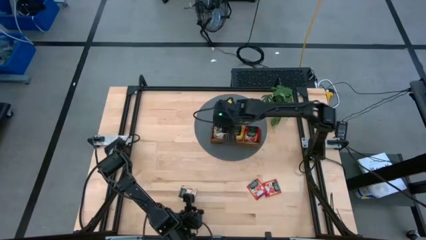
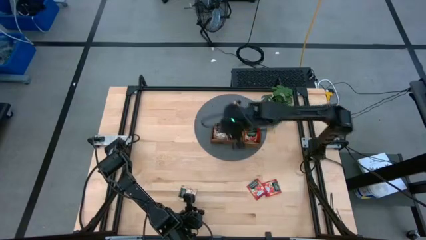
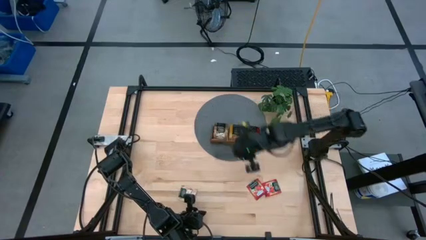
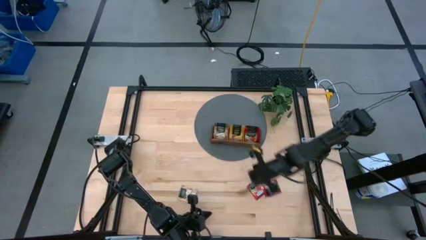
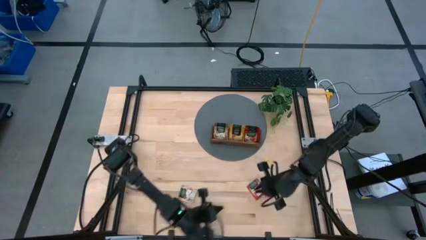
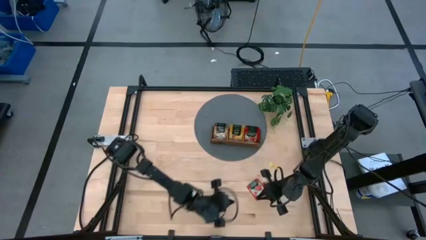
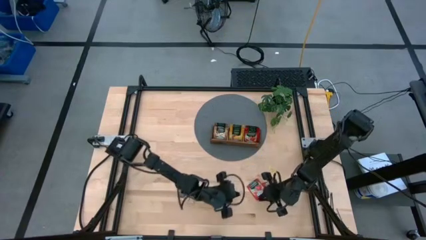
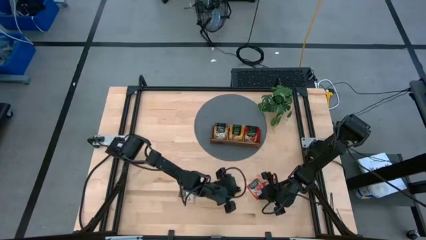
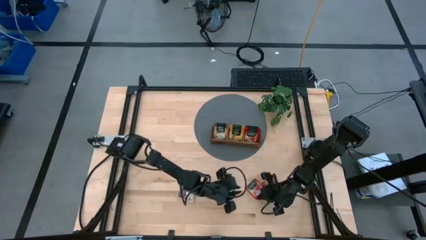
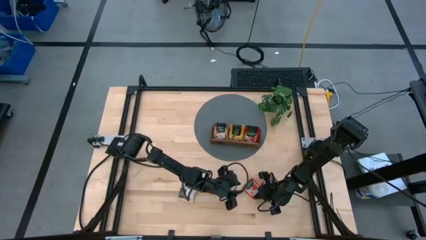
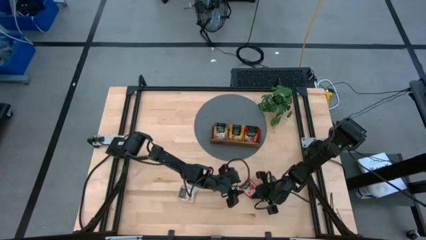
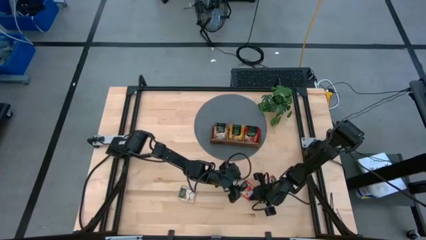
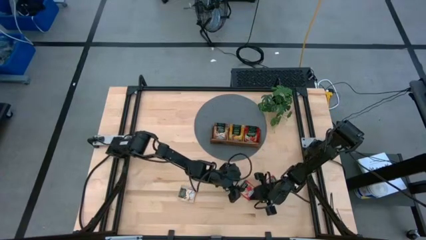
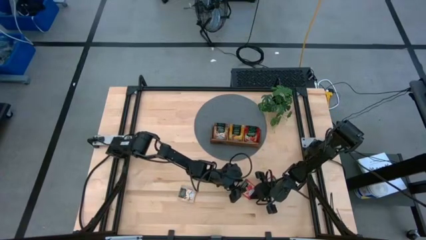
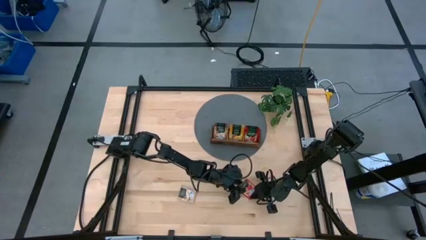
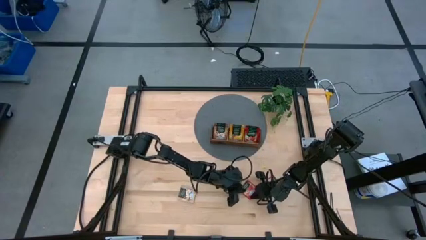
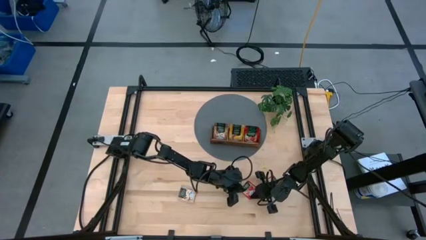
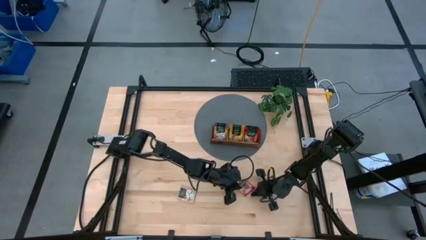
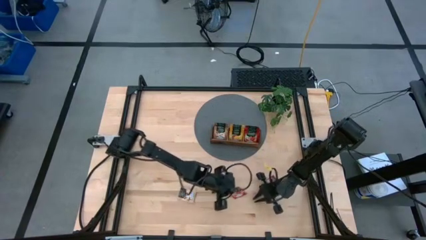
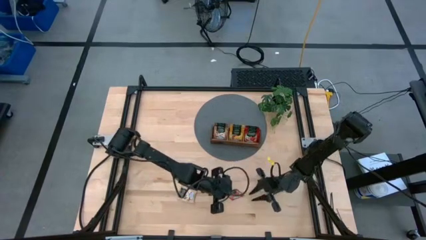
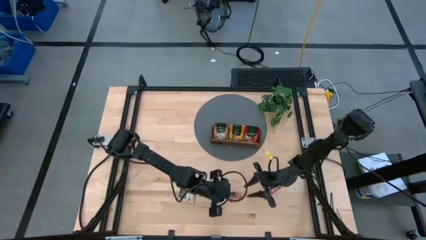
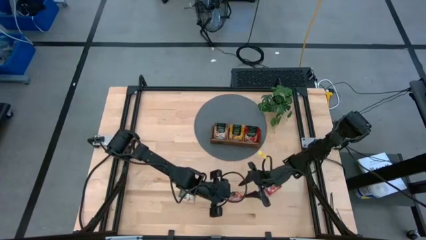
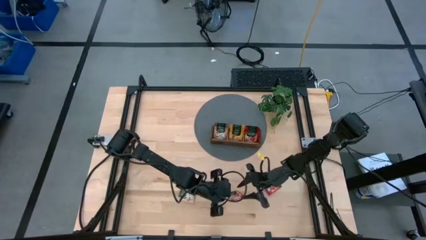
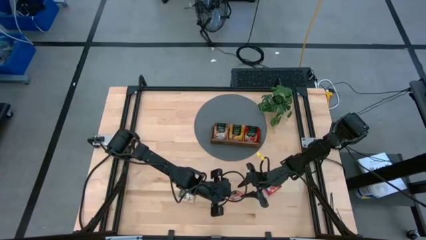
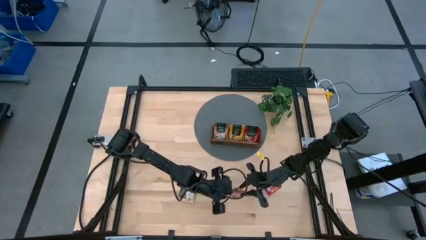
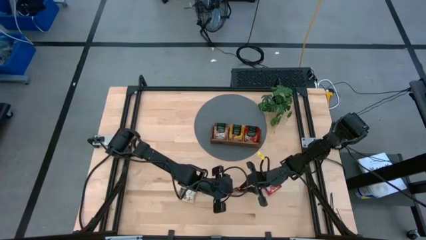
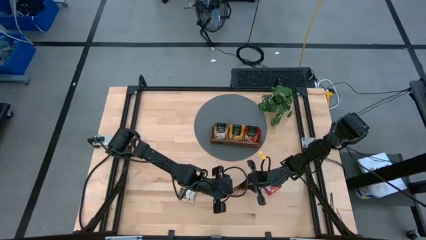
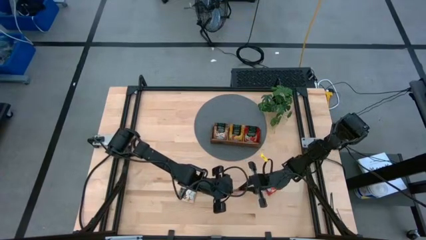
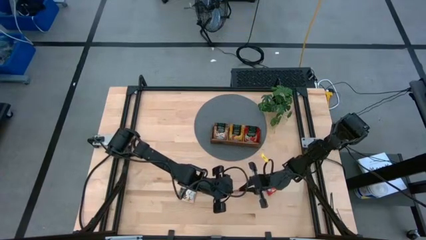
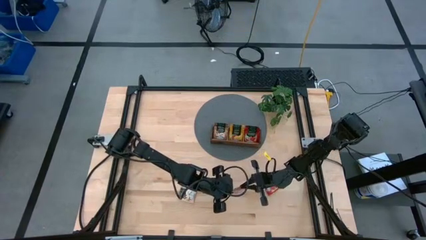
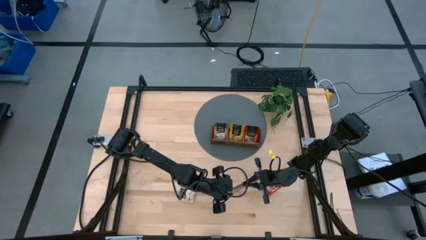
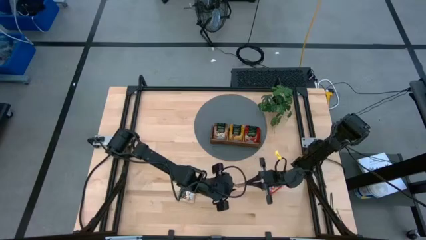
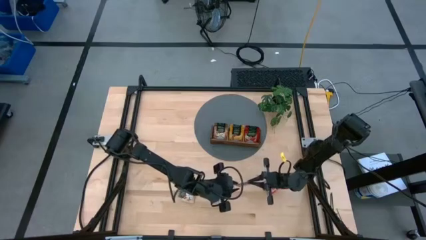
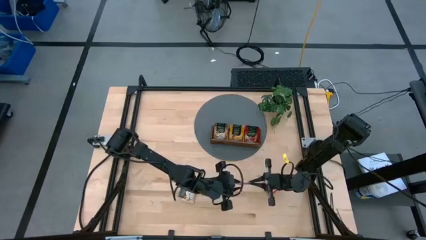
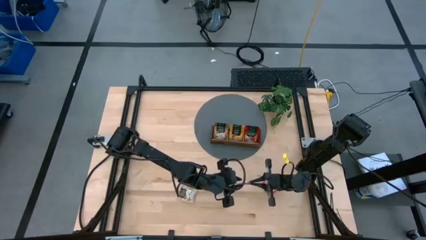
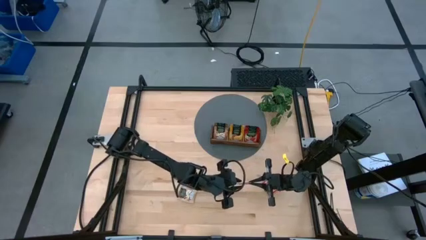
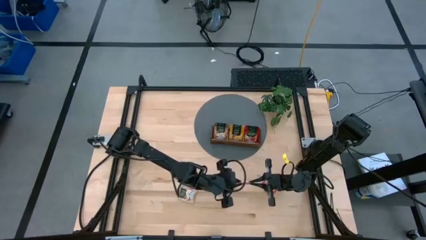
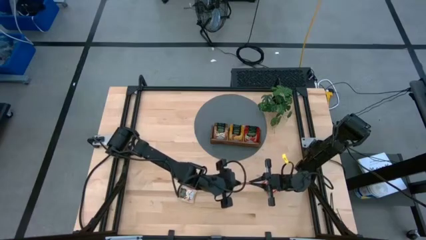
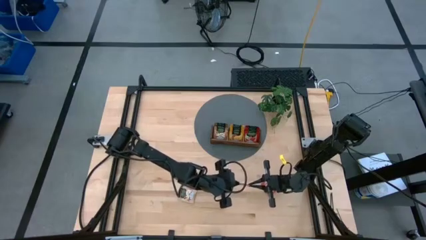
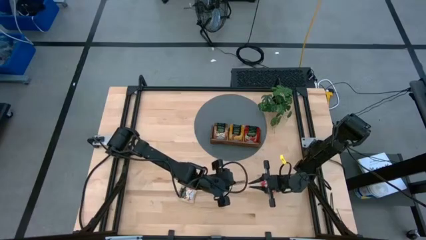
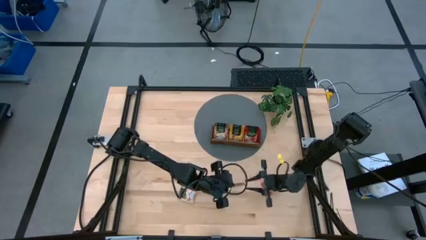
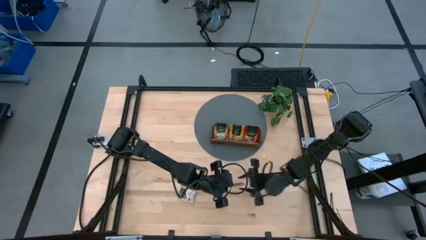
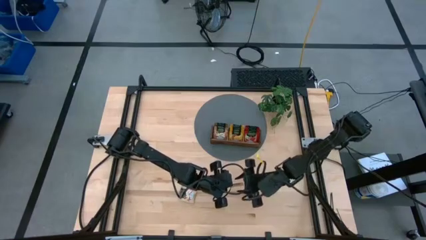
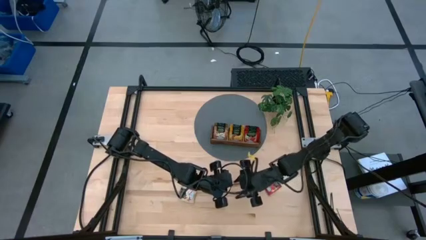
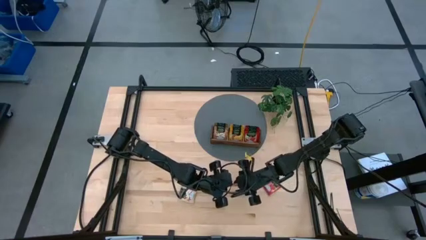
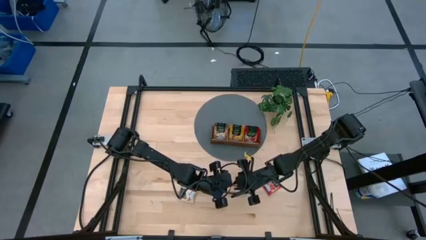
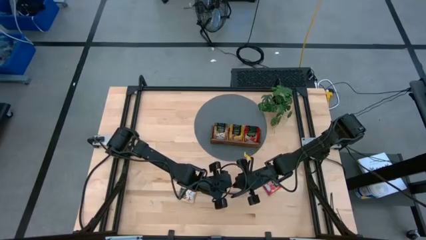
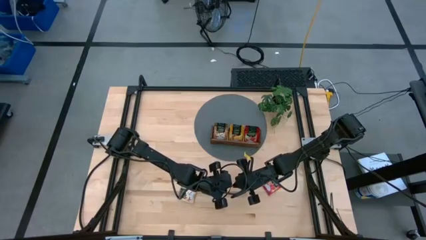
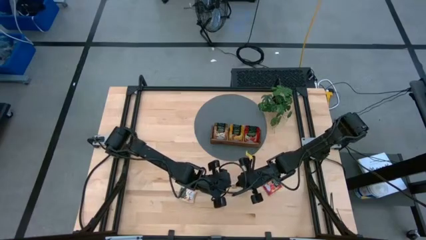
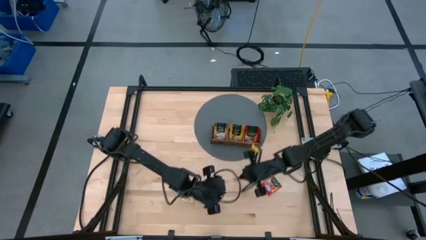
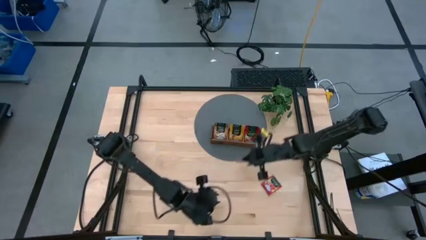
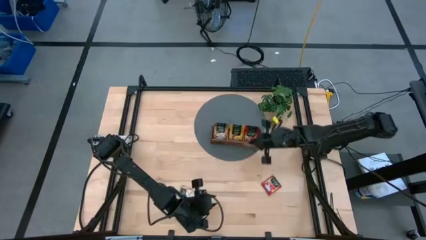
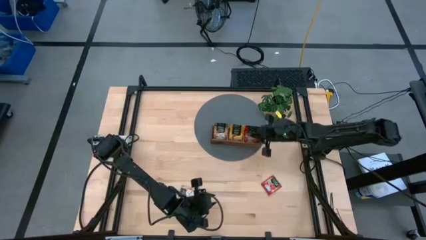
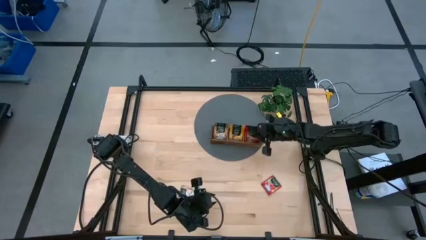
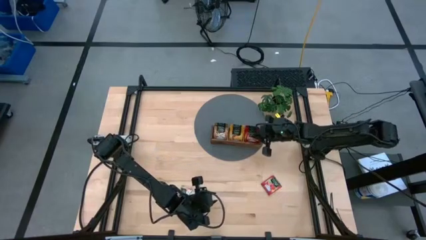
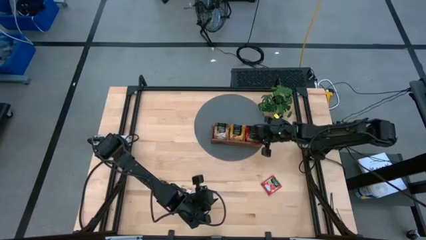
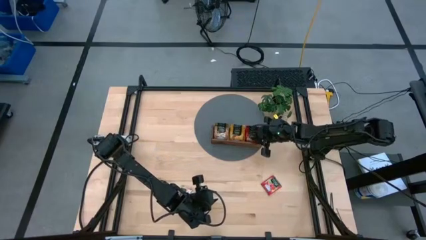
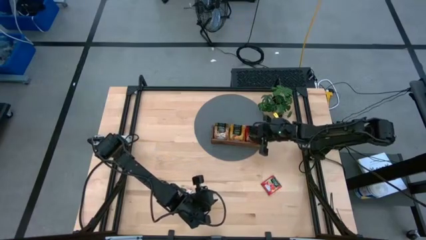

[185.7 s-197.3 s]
Task: Pick & Place Tea
Put the red tea bag into the right section of the wooden organizer

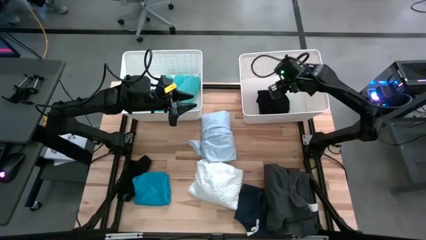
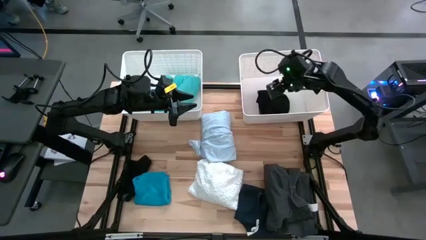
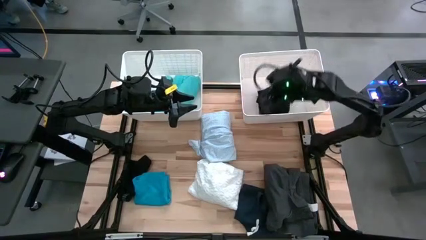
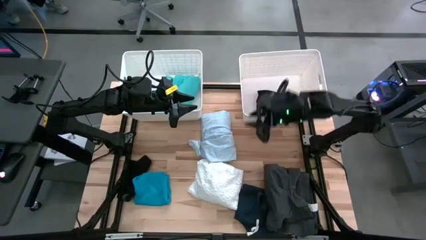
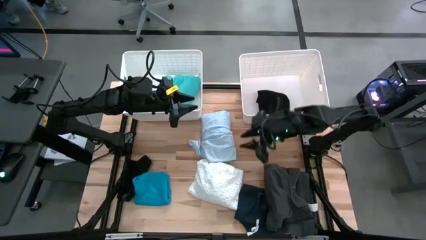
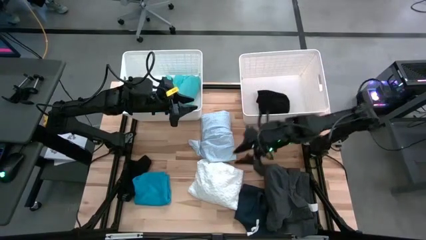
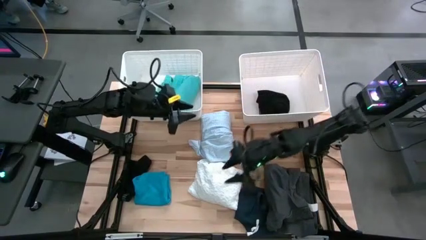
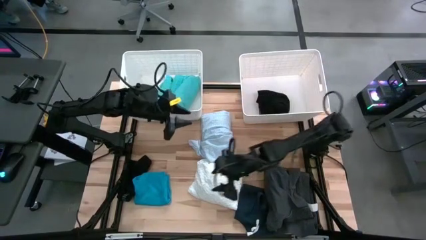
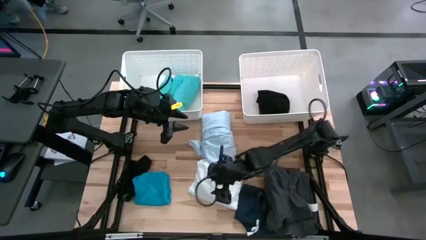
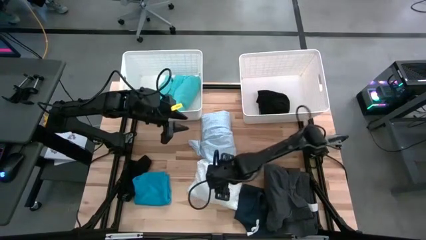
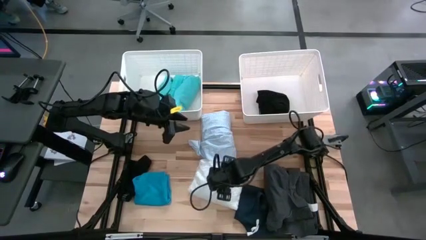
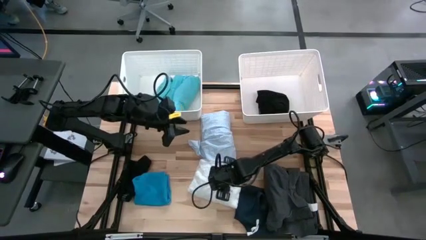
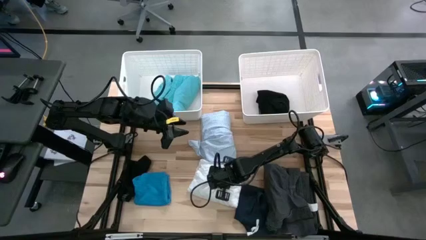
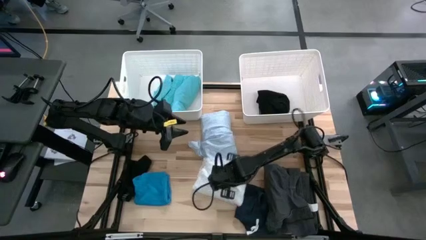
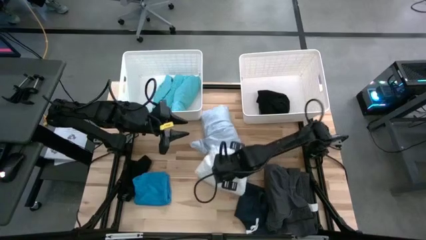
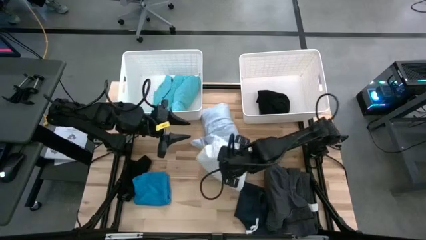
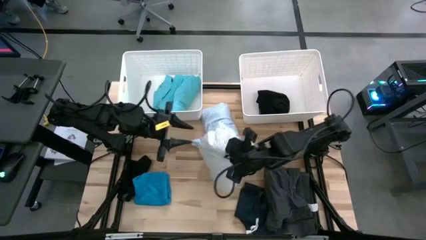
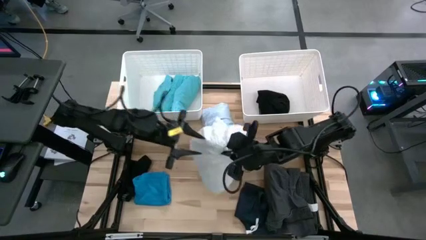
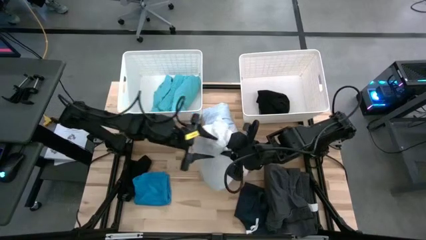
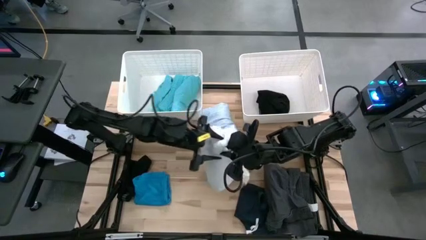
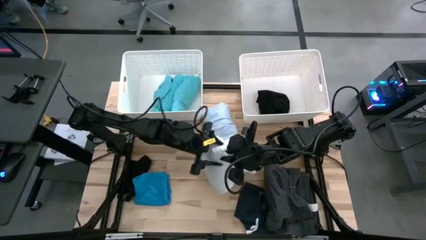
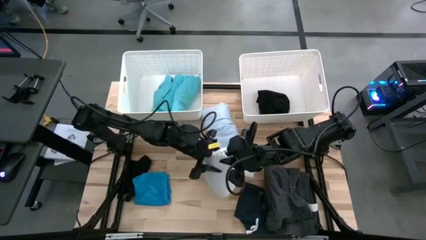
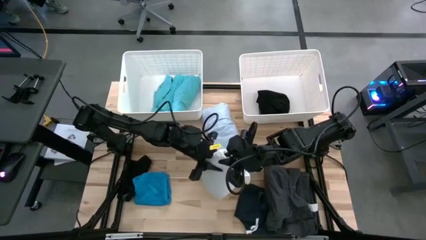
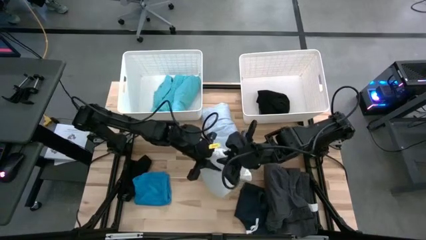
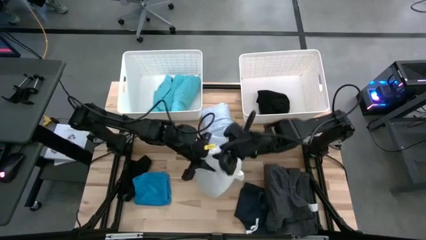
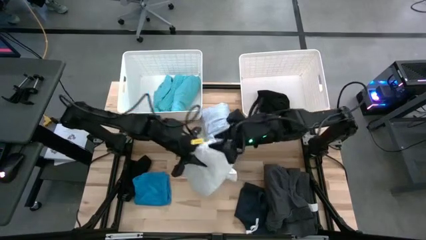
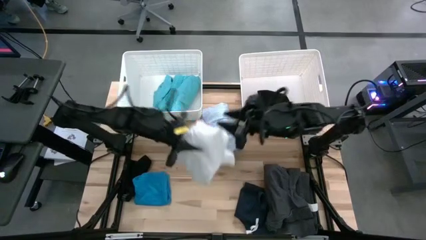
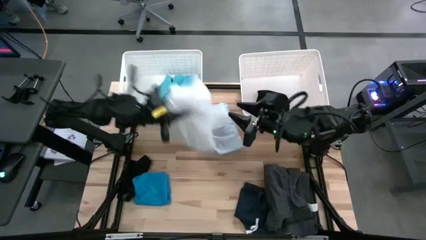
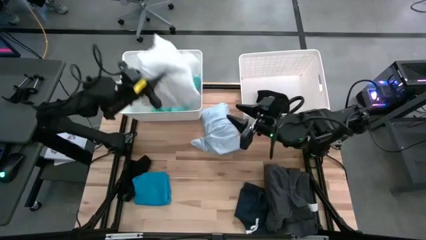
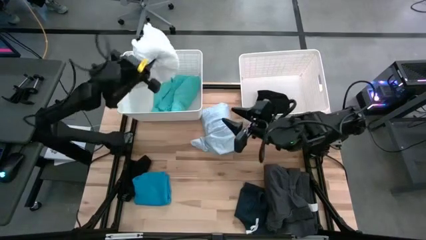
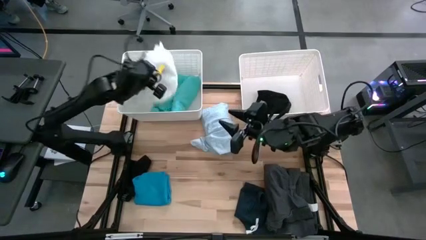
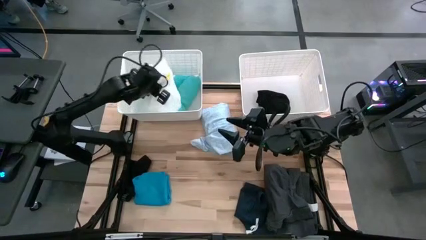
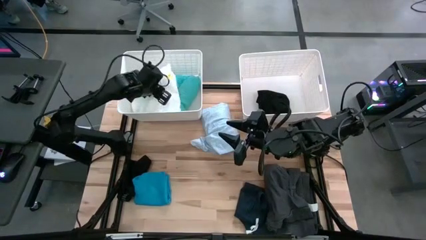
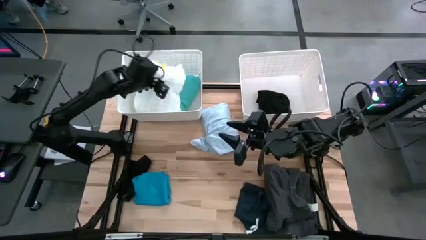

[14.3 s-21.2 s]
Task: Sort clothes
Put the white shirt into the left white bin
